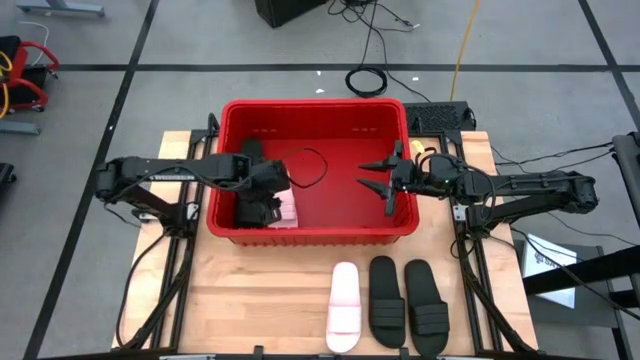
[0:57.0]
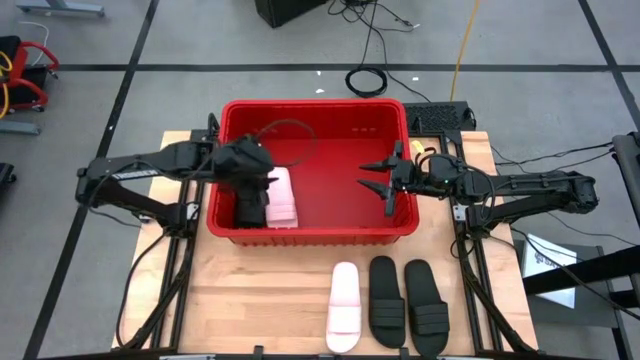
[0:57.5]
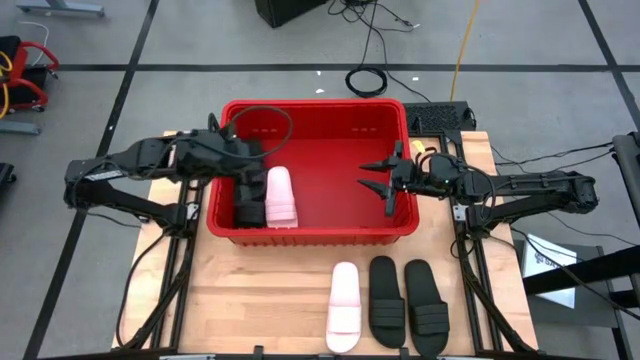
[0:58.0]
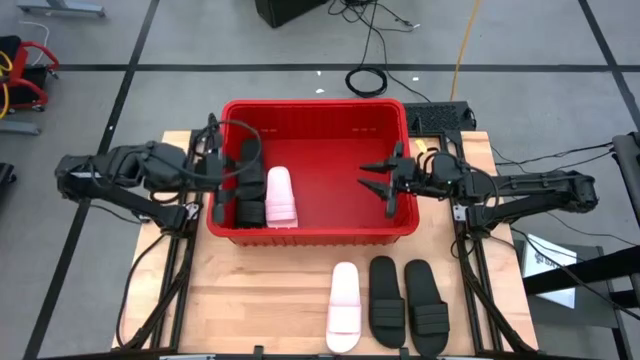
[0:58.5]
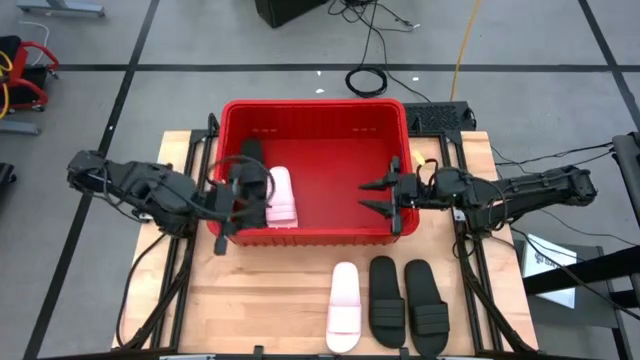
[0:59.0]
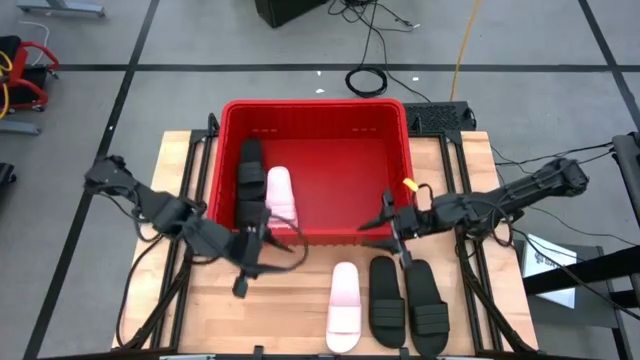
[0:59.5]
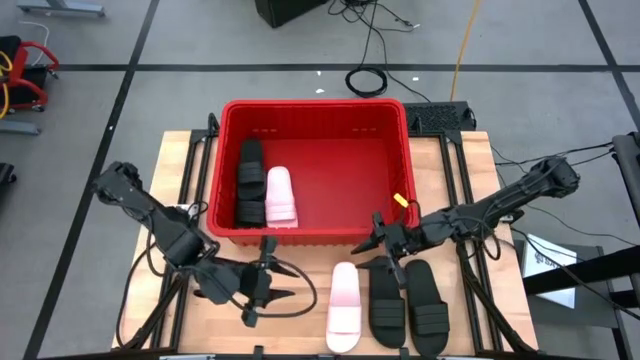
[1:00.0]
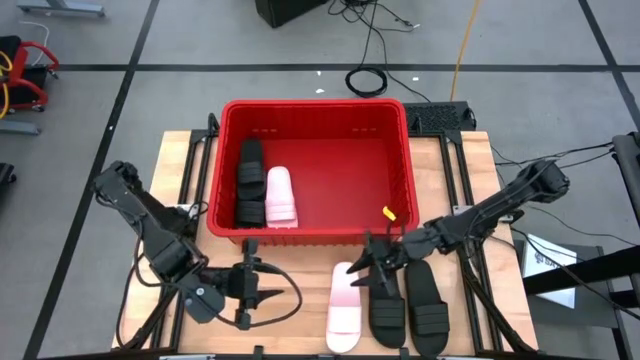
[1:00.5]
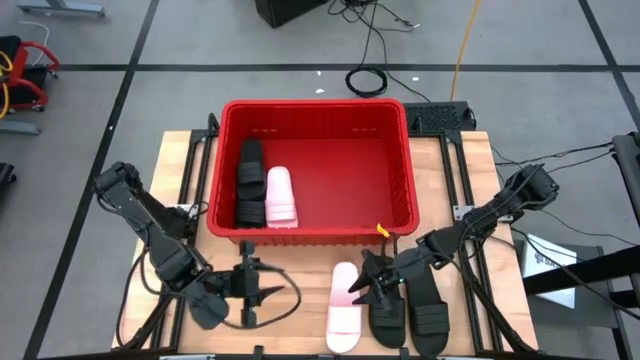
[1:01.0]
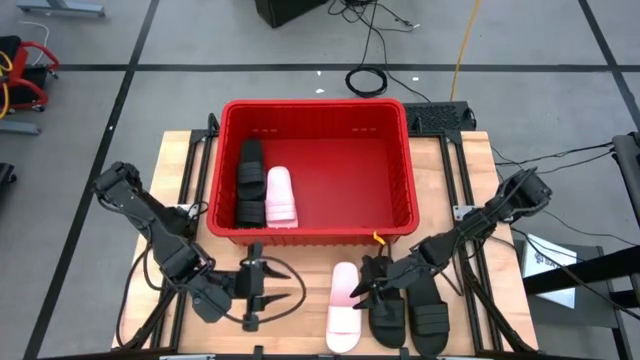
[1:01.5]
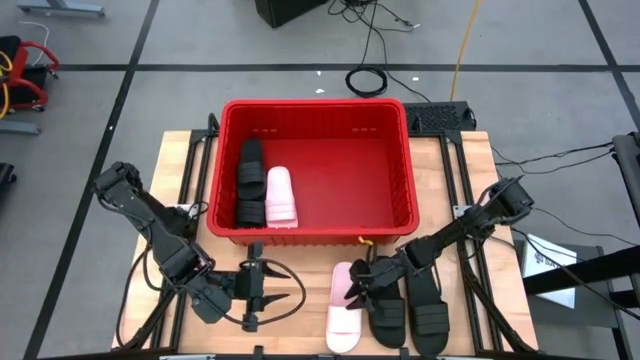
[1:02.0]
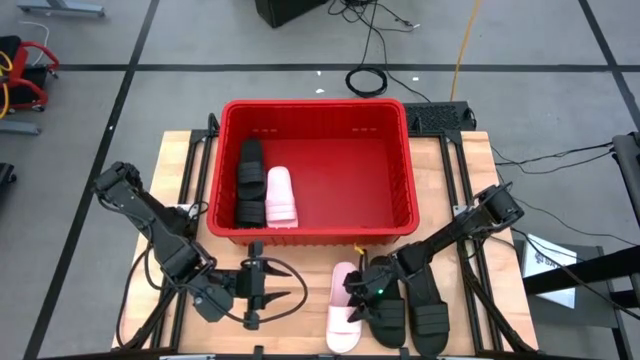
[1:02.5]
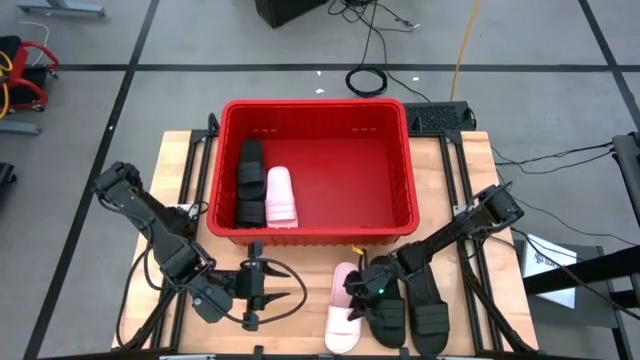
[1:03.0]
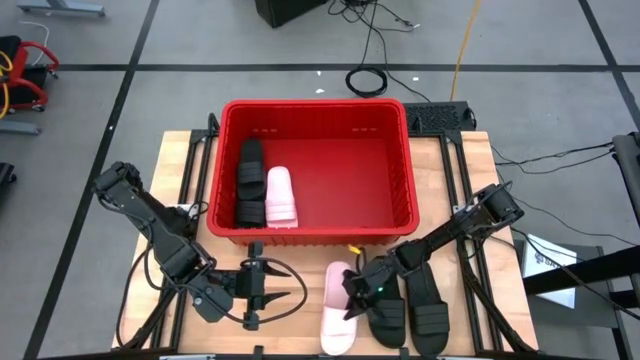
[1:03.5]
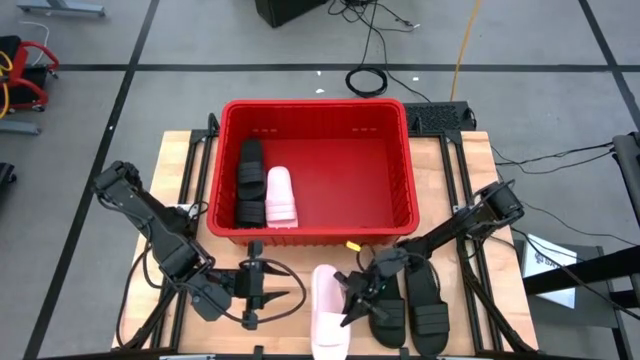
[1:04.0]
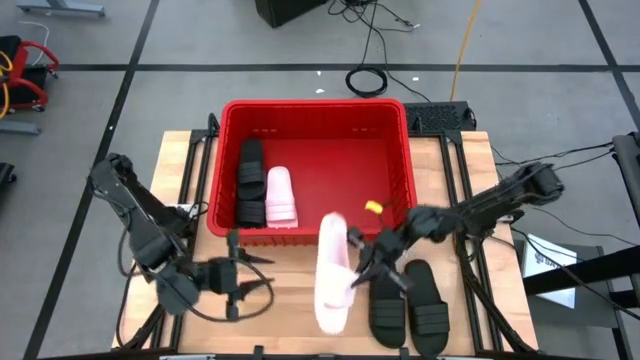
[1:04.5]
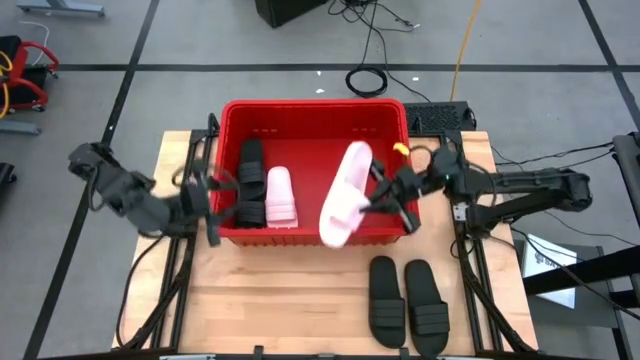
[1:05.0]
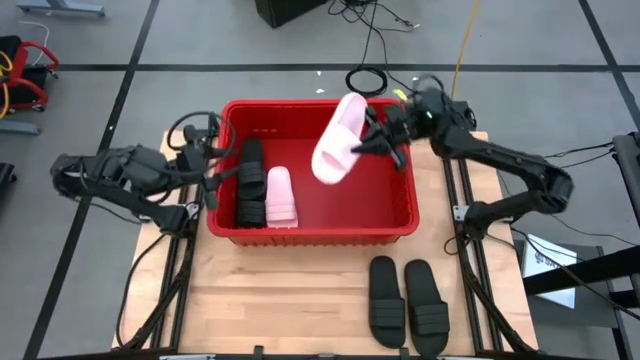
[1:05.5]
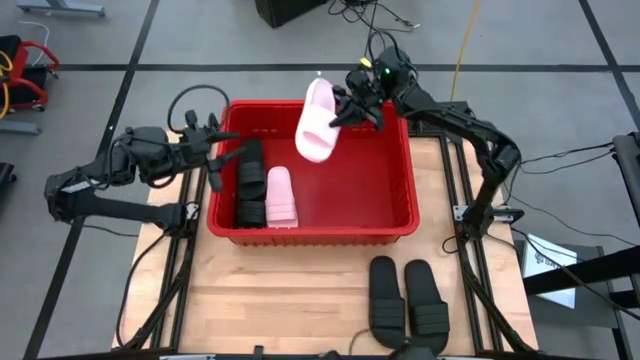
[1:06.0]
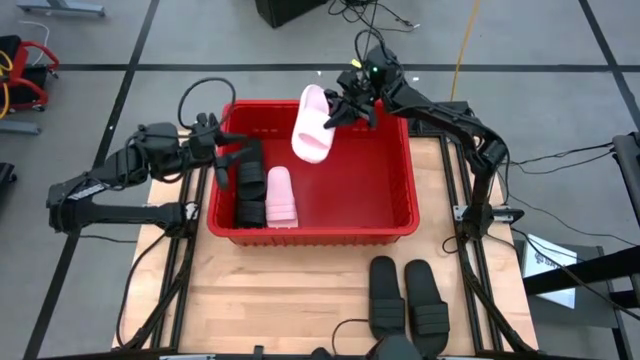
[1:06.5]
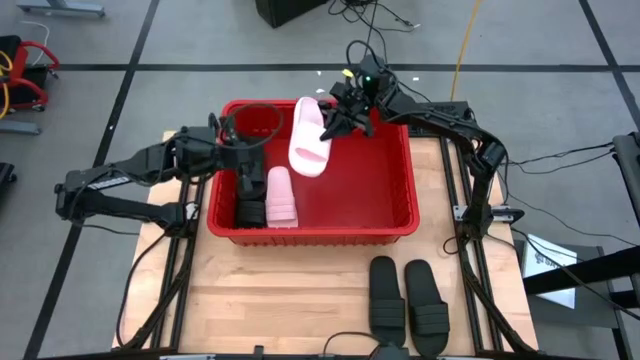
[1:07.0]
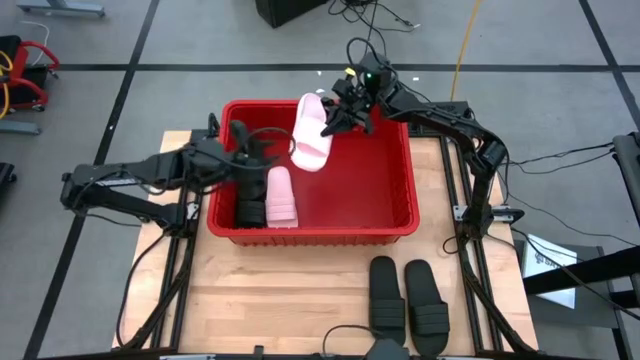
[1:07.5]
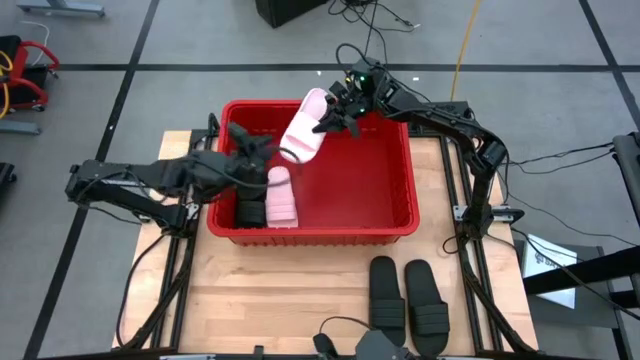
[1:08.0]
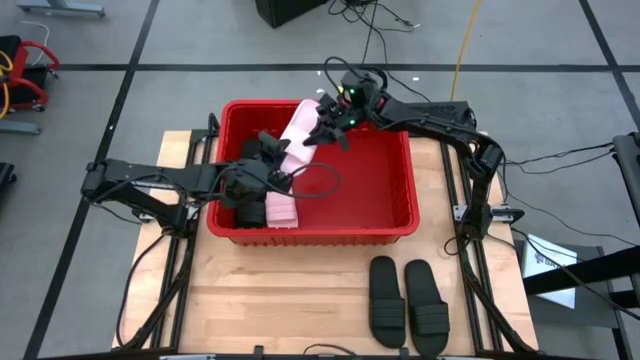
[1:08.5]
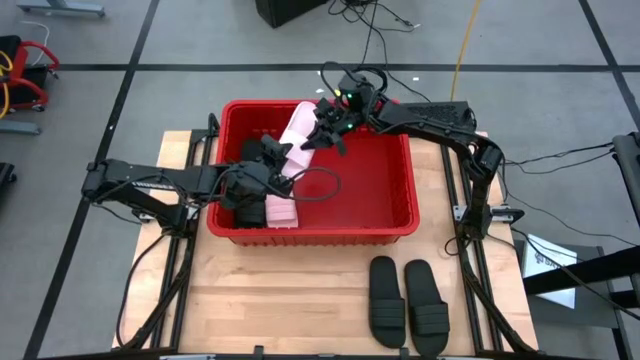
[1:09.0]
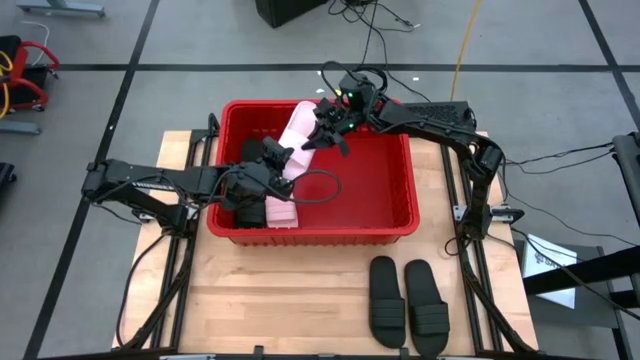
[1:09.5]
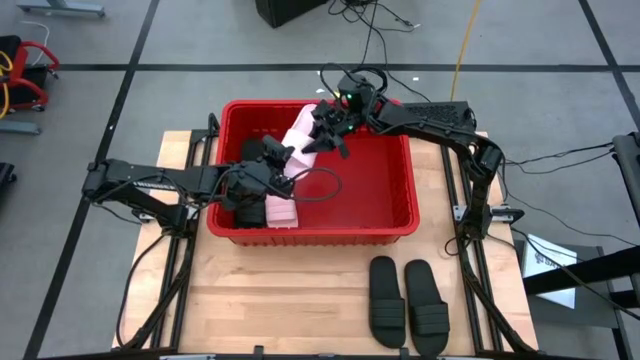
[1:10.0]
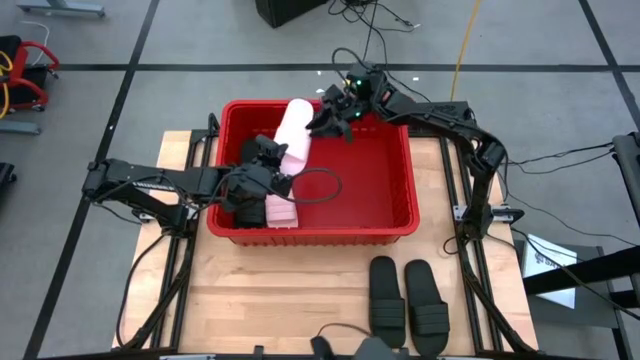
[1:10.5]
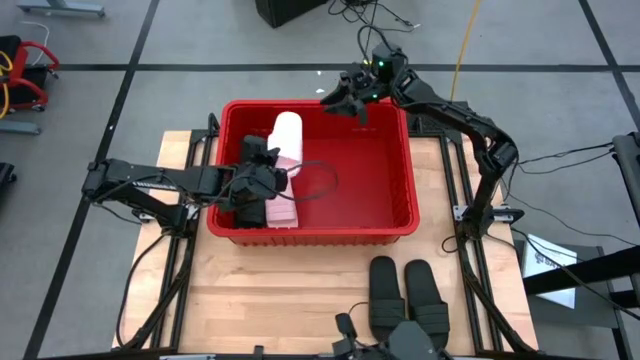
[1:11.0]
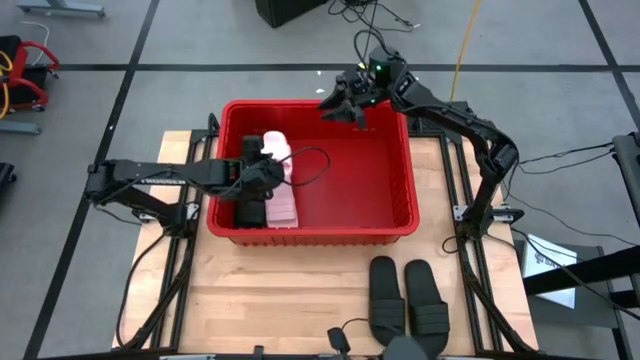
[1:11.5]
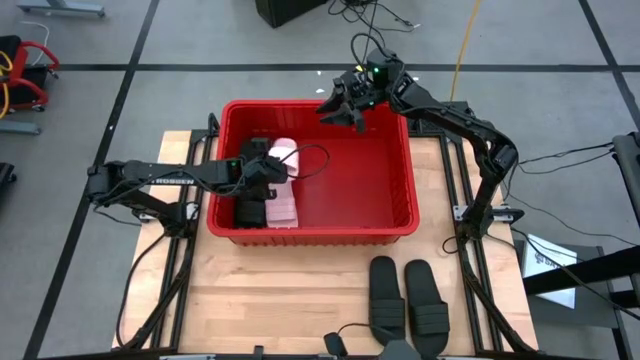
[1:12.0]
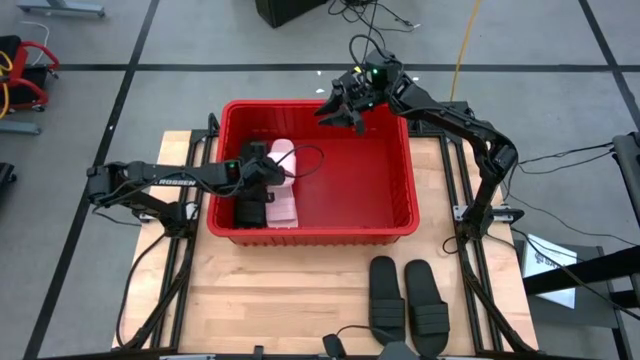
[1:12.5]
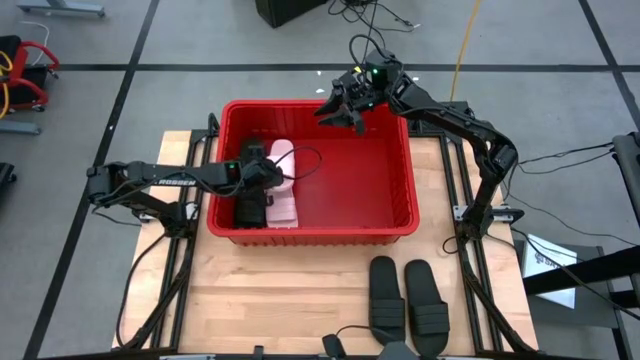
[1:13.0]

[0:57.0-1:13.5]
Task: Pick and place slides into bin
Put the white slipper into the red bin

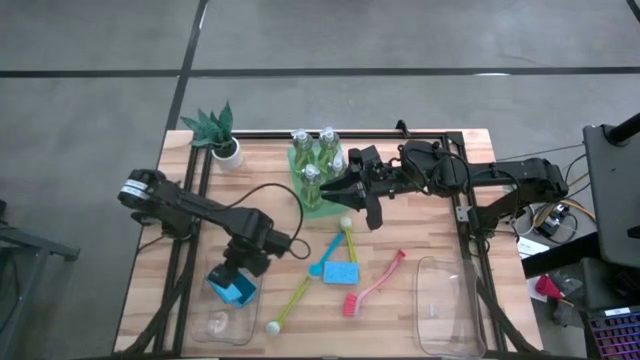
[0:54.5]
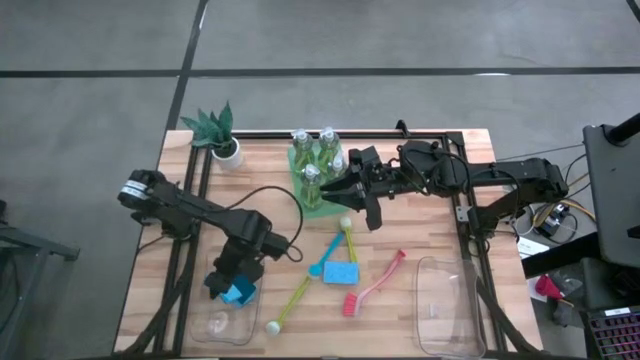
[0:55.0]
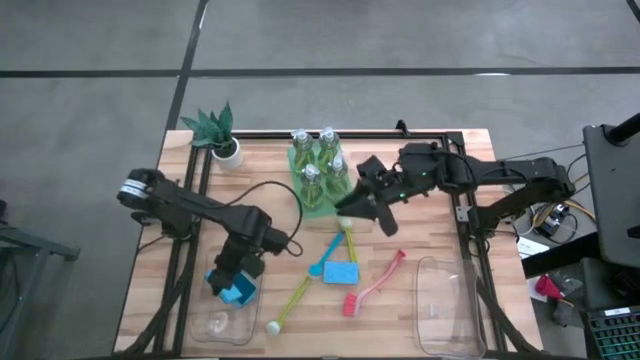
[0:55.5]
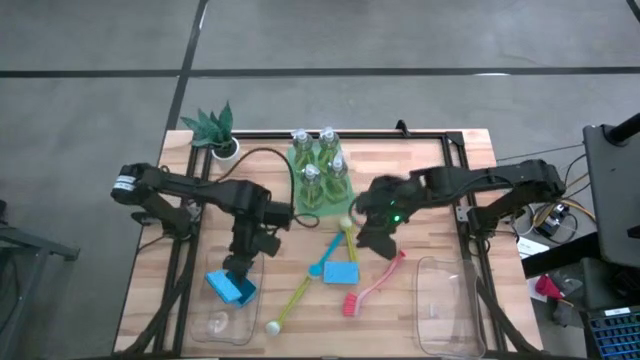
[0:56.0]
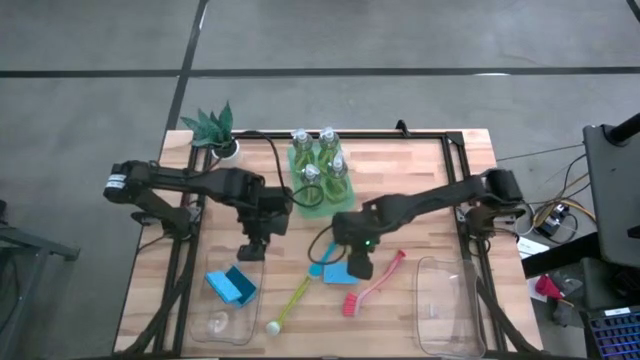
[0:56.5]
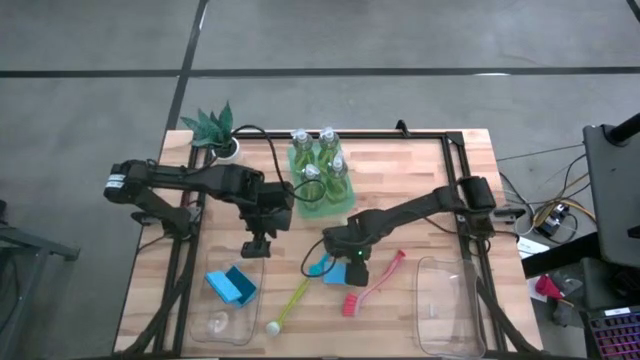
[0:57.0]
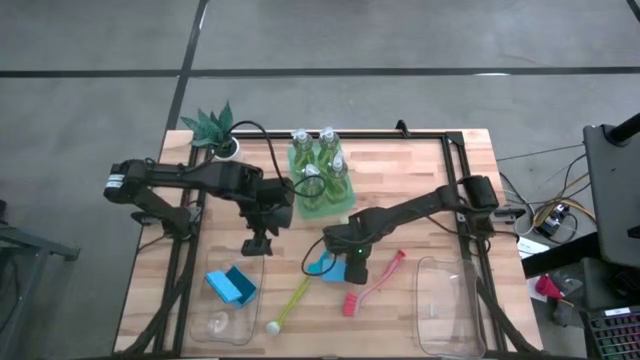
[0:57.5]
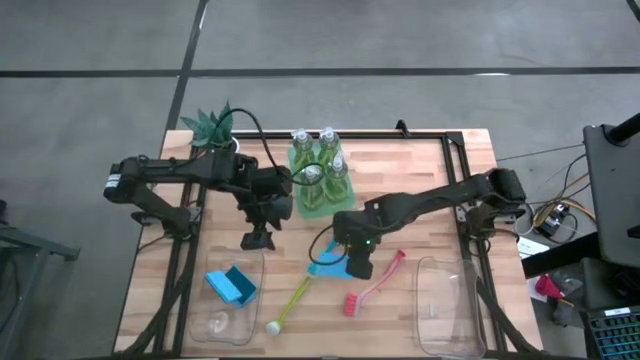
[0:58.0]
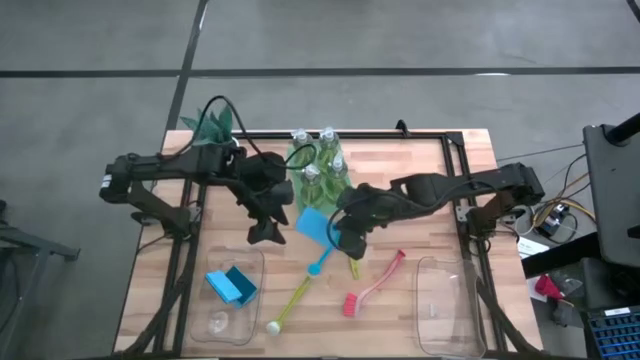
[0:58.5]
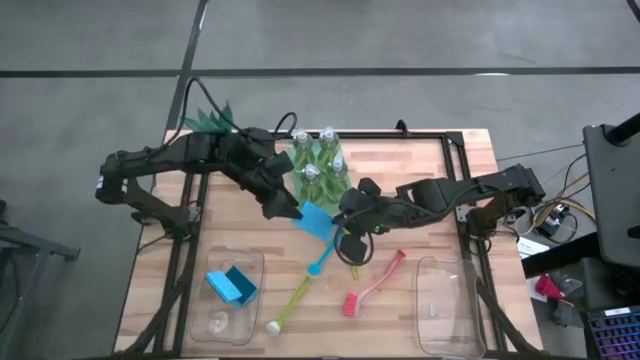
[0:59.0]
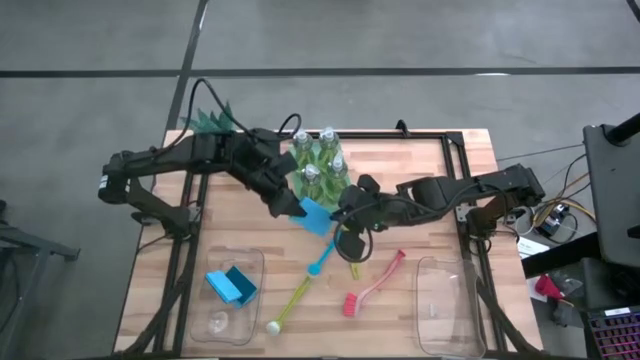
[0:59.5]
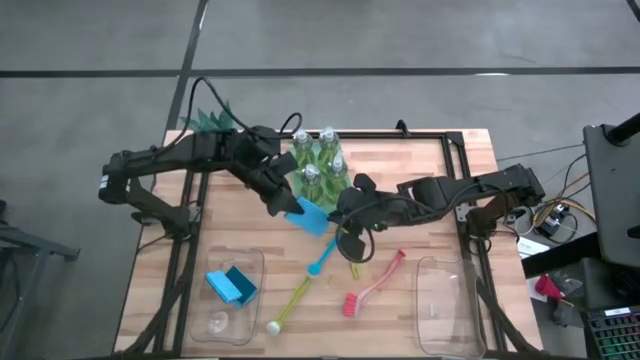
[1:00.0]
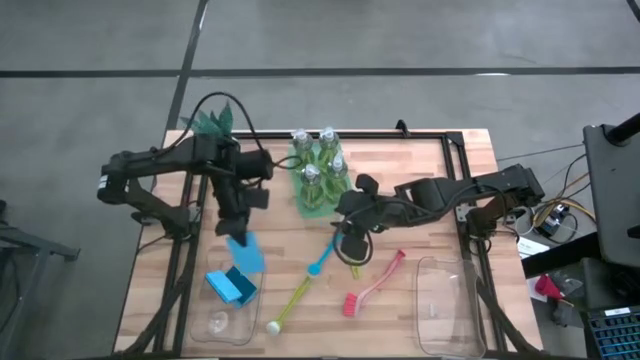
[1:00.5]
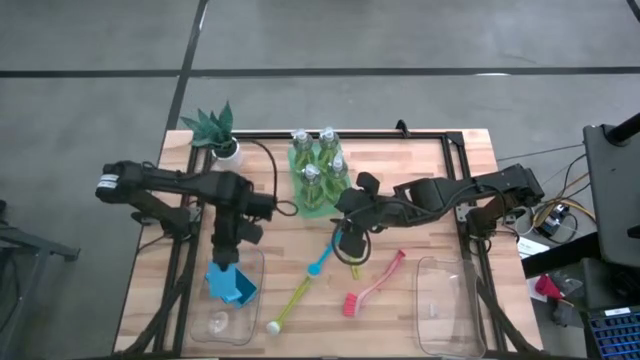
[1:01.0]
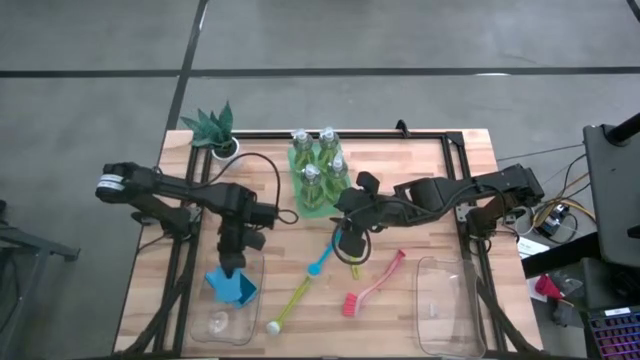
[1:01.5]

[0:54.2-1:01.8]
Task: Pick & Place Kitchen Sink Supplies
Put the blue sponge into the left transparent bin
